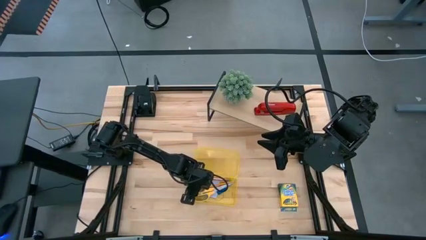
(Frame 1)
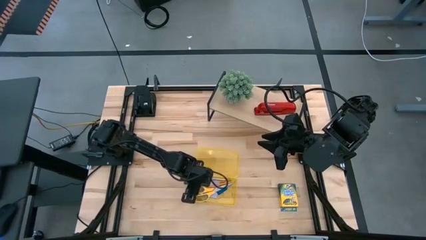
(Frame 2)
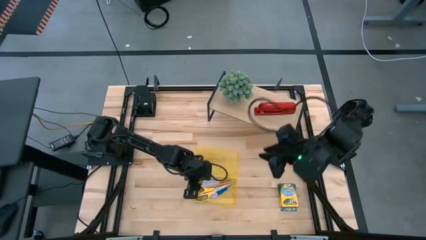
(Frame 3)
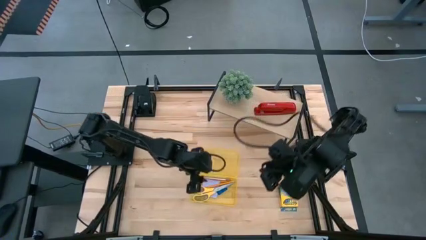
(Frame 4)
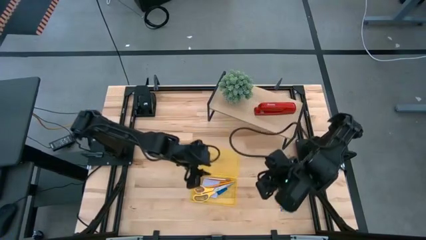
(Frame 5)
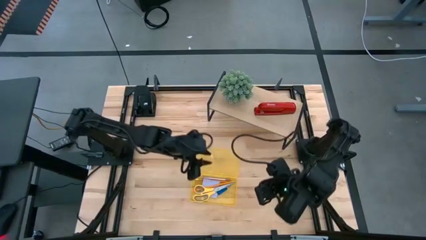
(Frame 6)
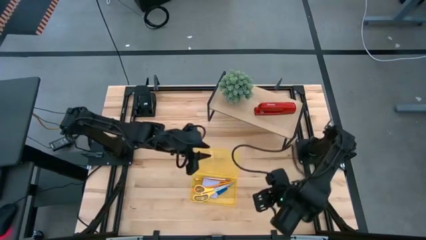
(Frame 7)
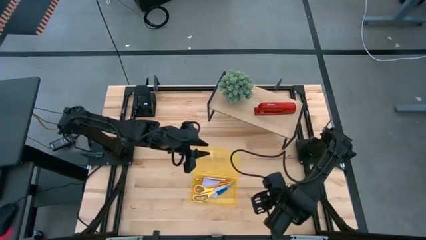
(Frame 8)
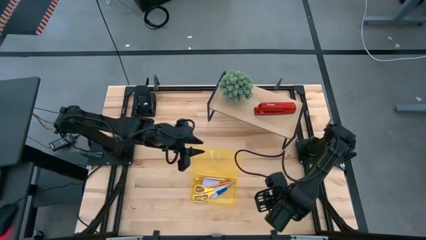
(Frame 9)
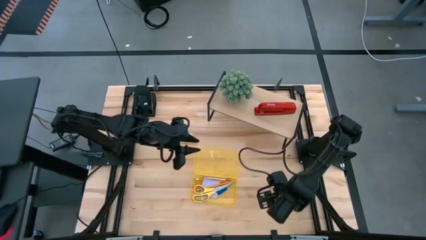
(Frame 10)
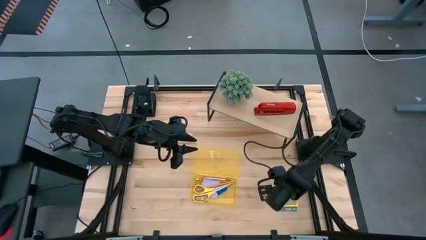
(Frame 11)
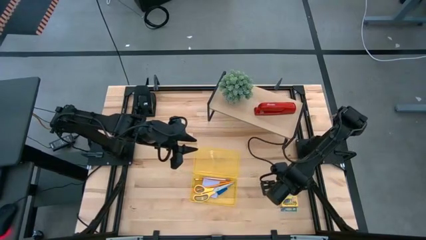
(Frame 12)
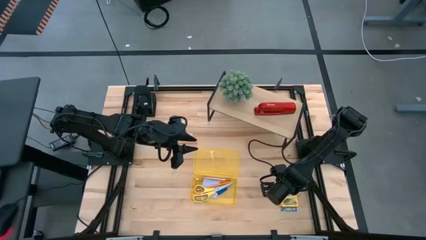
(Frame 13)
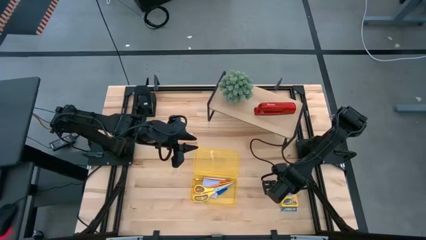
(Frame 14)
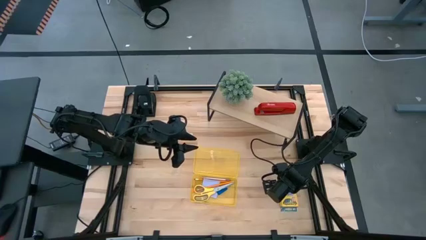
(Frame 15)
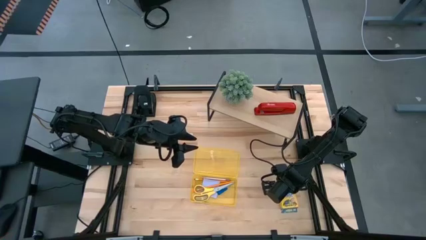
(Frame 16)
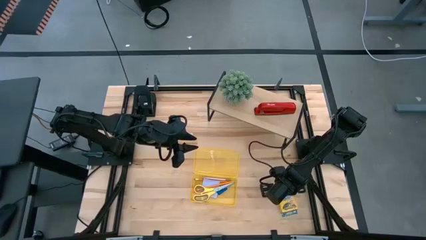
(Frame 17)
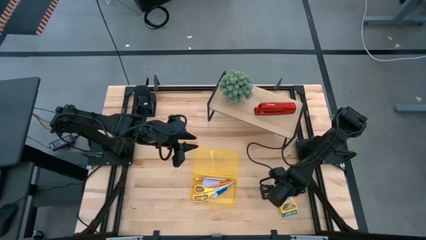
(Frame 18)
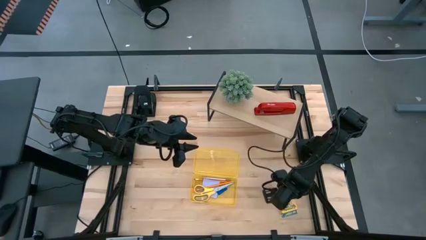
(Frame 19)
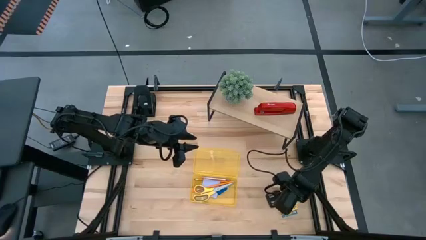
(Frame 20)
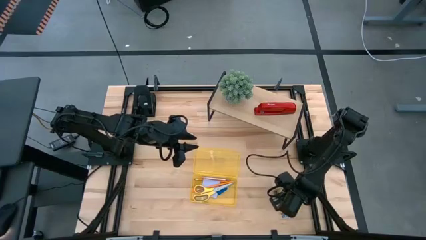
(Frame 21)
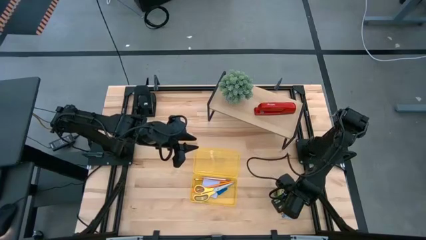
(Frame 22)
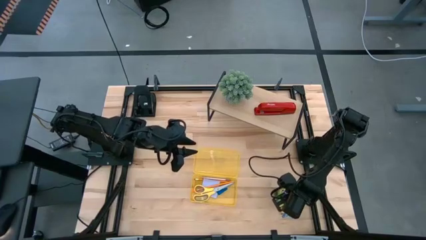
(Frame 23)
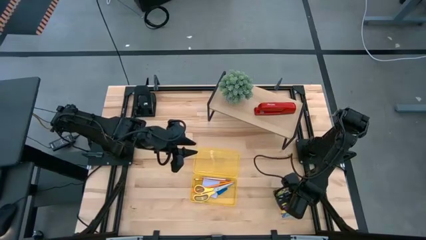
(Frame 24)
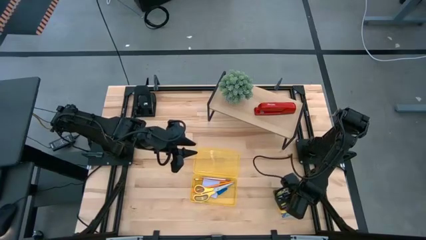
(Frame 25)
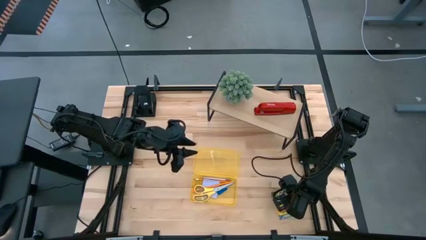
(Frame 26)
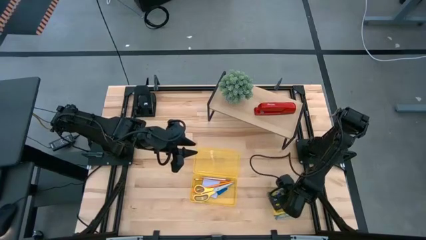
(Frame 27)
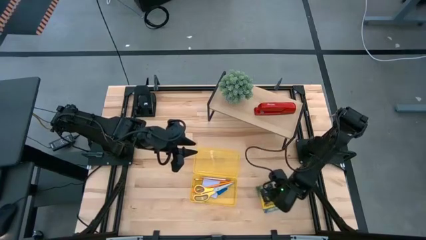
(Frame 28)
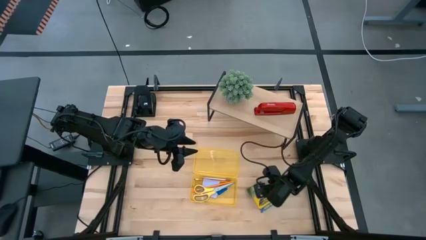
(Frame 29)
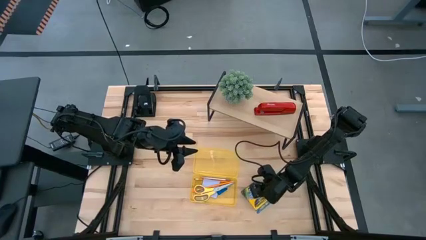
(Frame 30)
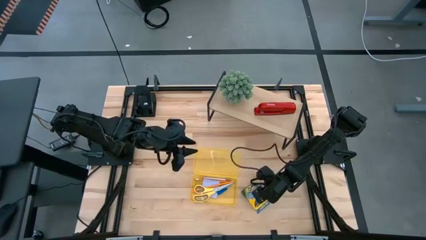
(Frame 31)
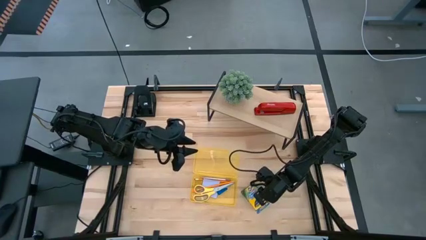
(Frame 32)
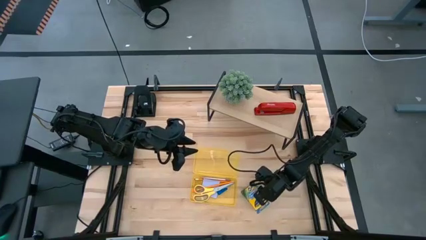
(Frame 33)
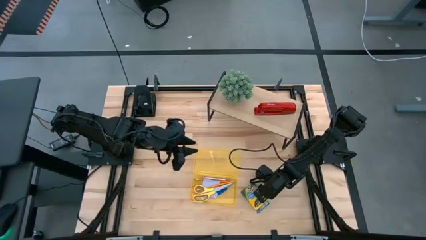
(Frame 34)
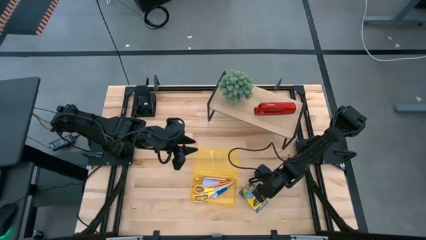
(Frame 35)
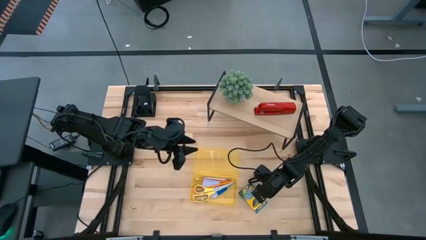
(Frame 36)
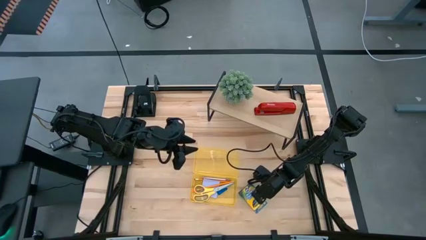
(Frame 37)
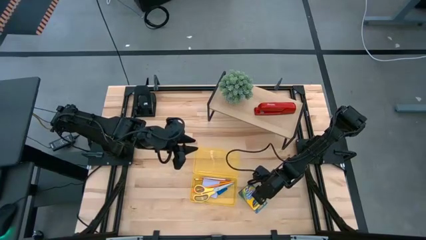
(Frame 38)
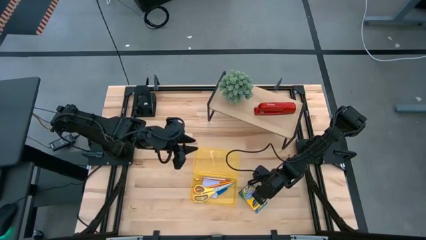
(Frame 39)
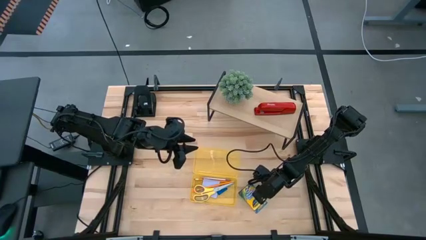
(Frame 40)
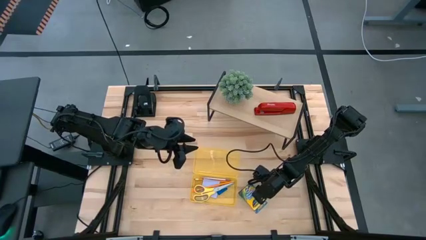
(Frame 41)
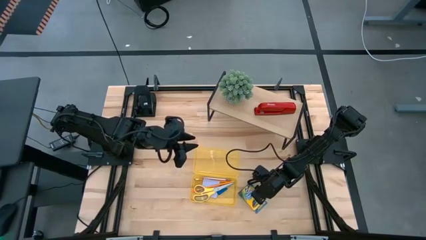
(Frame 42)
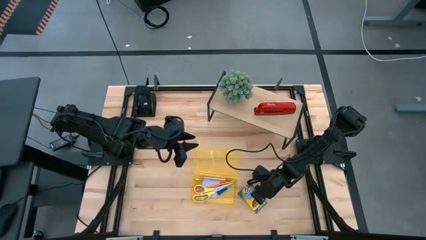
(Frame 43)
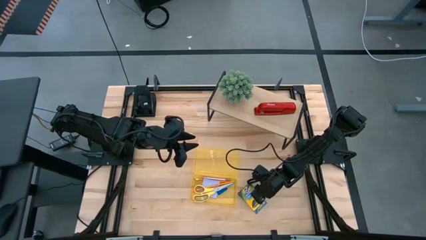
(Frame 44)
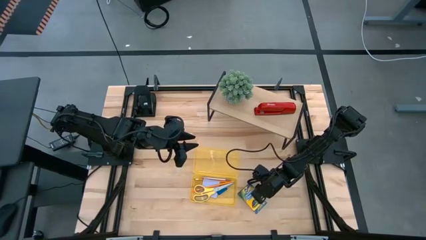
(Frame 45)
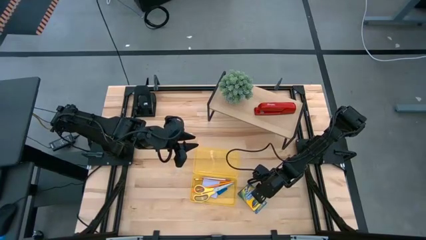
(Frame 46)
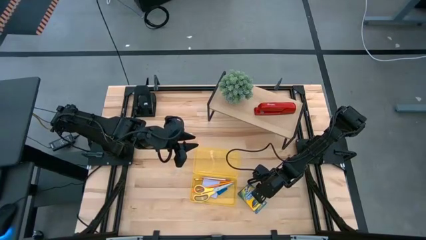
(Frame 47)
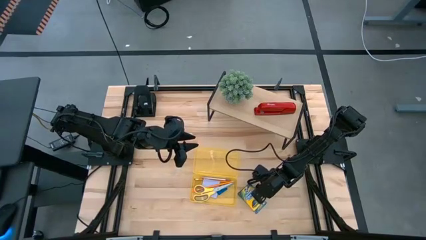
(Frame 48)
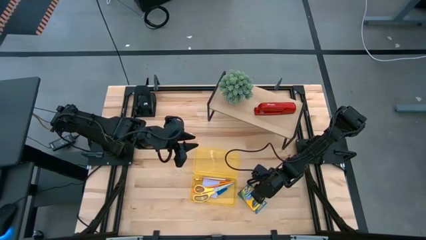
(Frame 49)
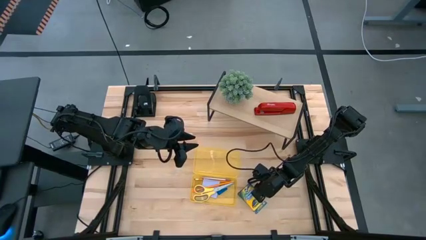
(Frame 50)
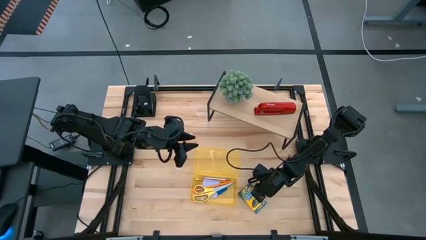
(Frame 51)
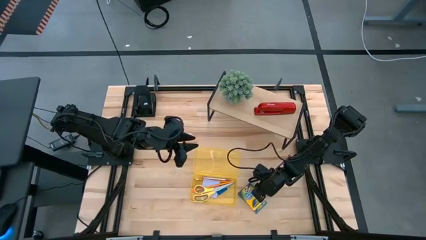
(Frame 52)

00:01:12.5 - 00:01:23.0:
Task: Pack school essentials
Put the crayon box into the supply box
